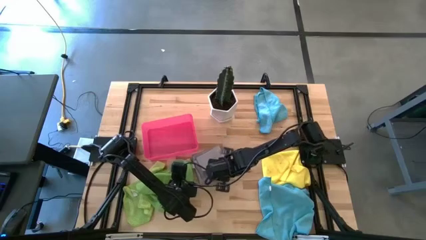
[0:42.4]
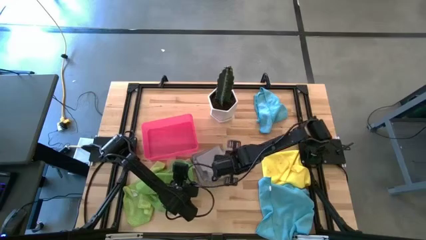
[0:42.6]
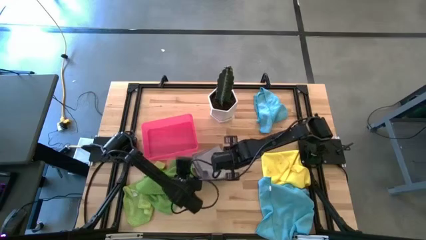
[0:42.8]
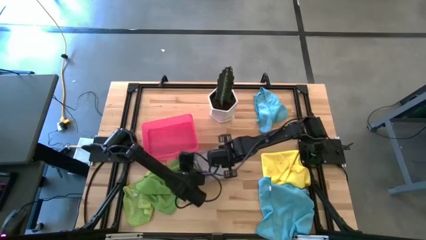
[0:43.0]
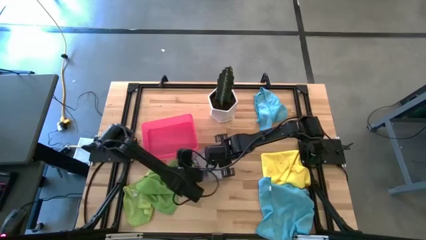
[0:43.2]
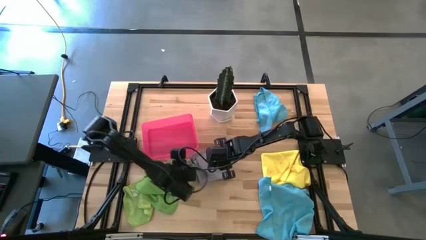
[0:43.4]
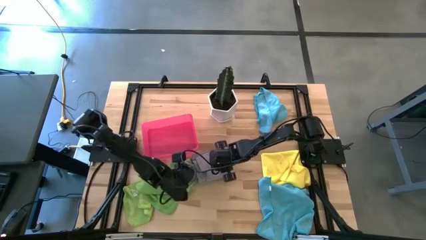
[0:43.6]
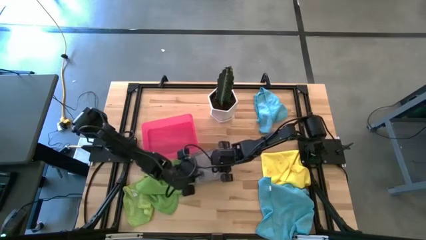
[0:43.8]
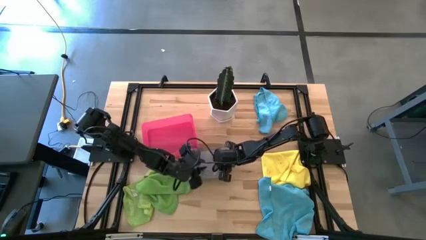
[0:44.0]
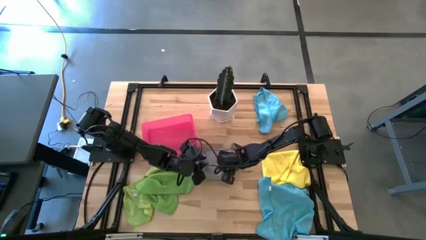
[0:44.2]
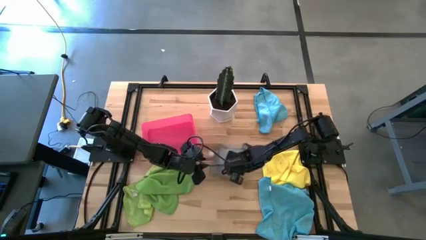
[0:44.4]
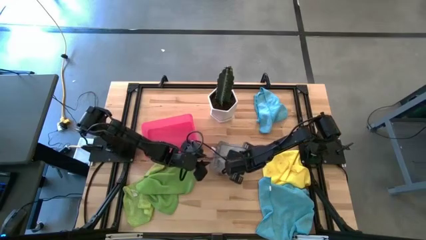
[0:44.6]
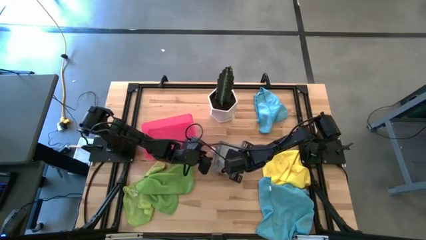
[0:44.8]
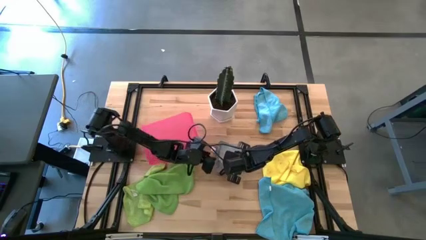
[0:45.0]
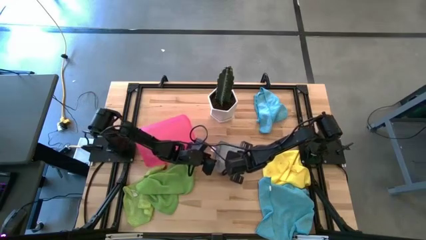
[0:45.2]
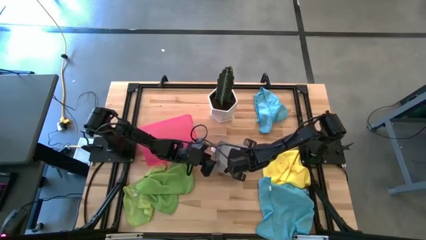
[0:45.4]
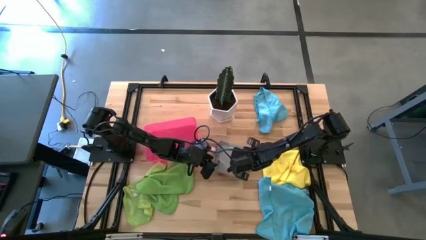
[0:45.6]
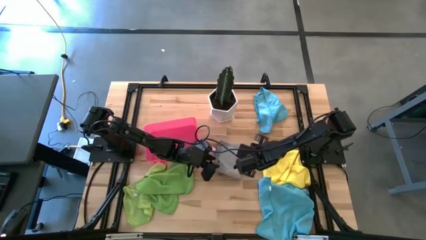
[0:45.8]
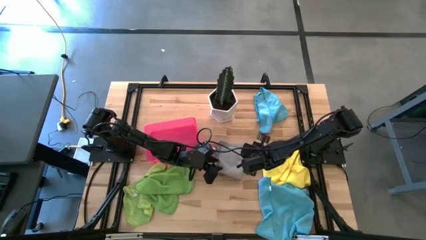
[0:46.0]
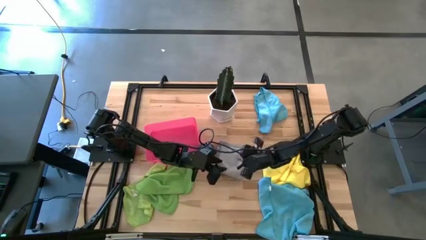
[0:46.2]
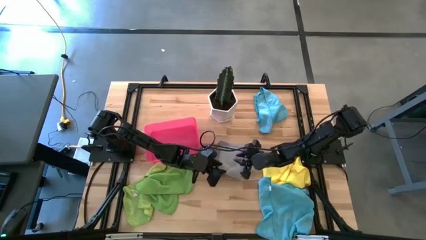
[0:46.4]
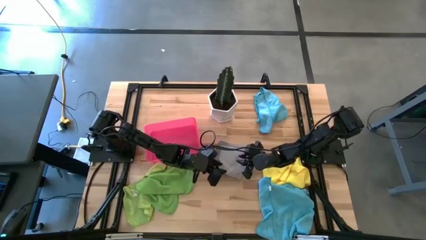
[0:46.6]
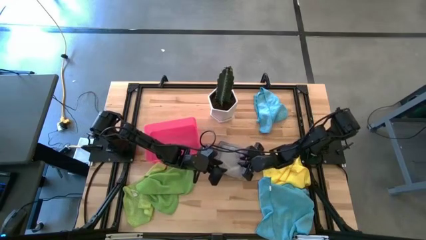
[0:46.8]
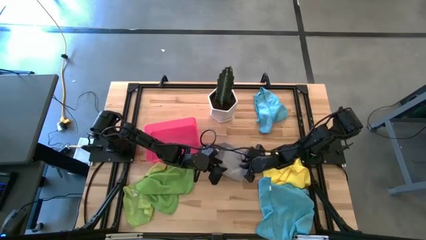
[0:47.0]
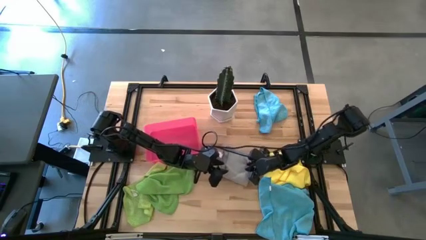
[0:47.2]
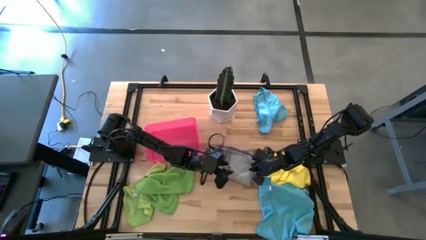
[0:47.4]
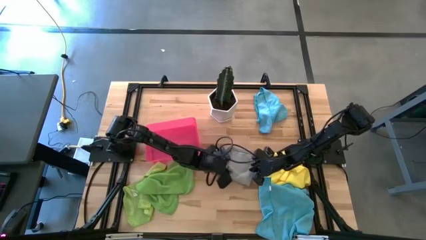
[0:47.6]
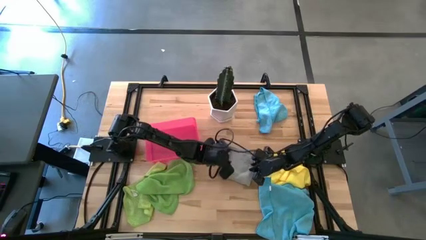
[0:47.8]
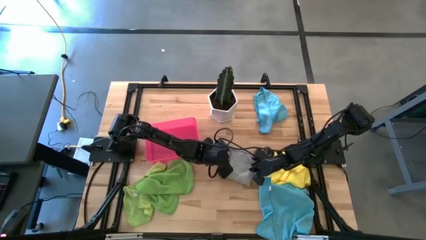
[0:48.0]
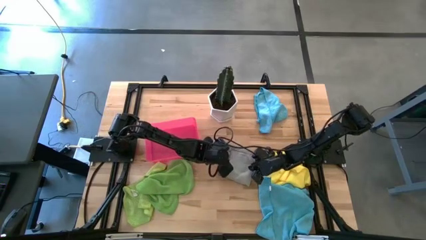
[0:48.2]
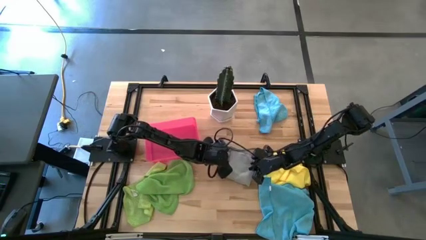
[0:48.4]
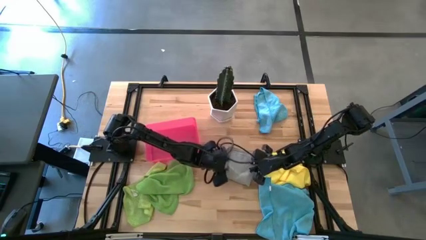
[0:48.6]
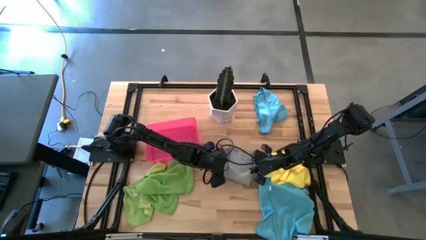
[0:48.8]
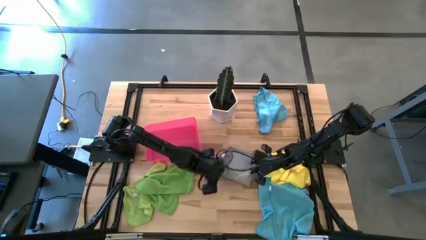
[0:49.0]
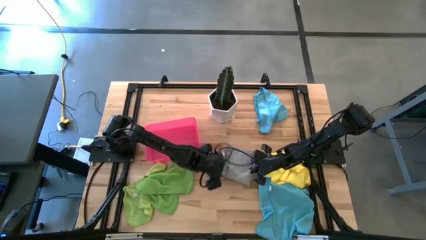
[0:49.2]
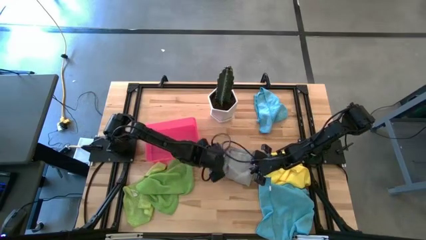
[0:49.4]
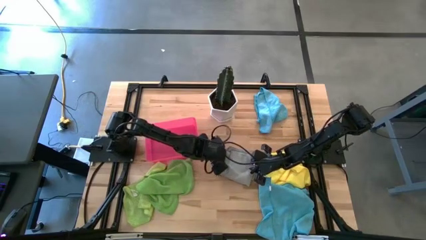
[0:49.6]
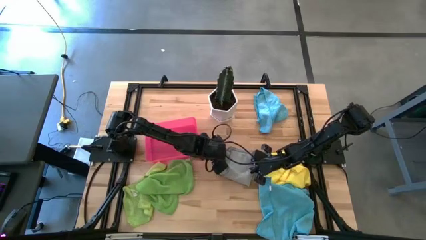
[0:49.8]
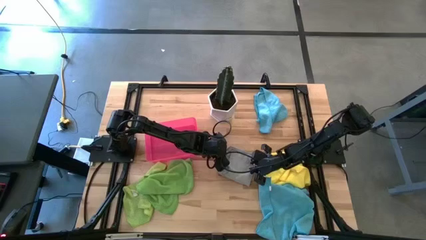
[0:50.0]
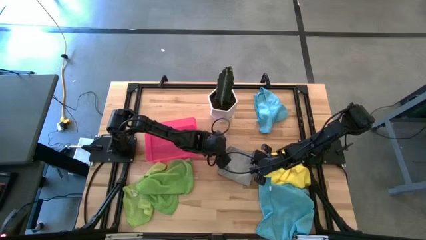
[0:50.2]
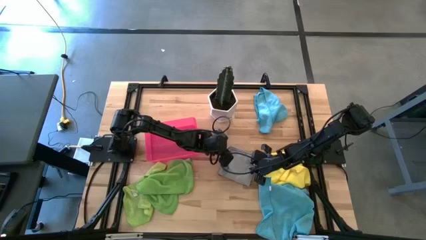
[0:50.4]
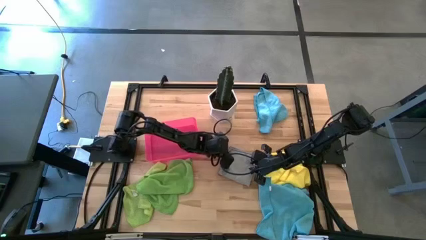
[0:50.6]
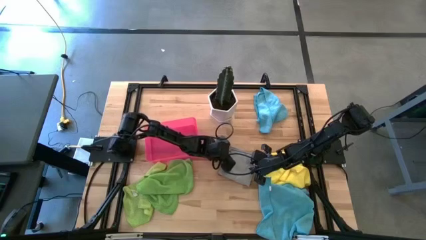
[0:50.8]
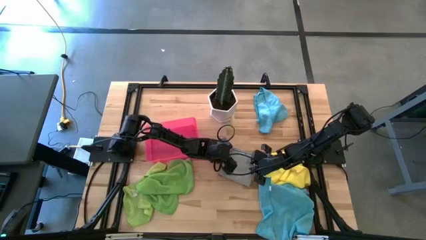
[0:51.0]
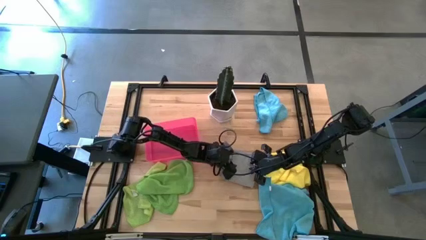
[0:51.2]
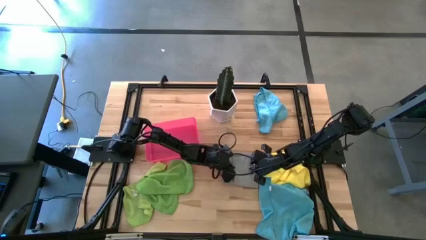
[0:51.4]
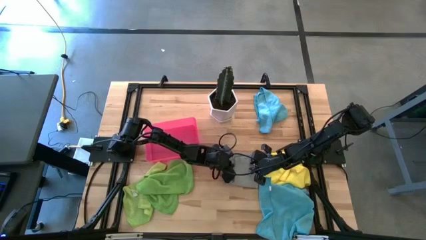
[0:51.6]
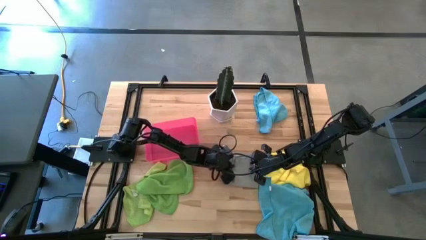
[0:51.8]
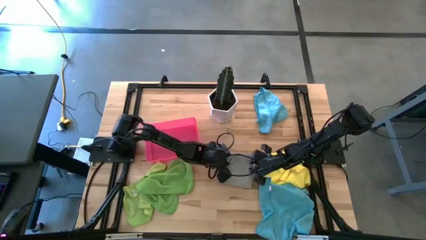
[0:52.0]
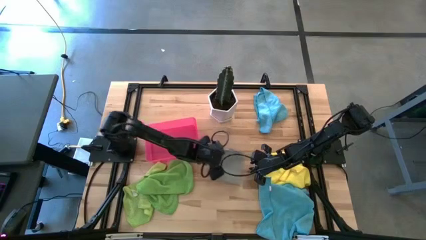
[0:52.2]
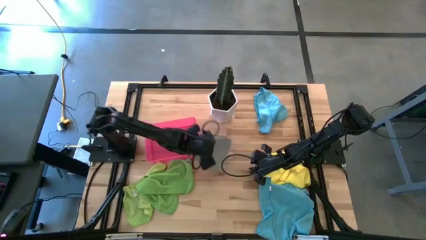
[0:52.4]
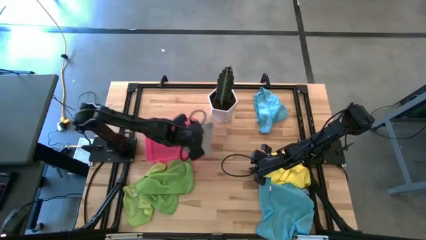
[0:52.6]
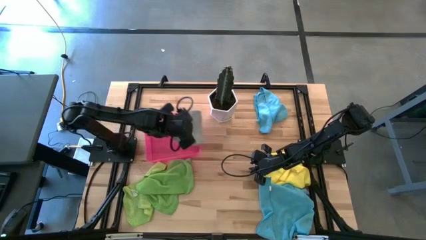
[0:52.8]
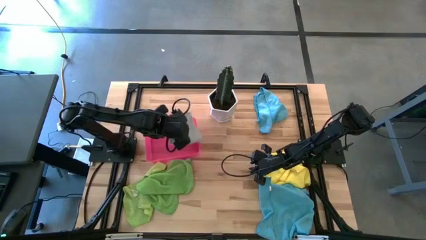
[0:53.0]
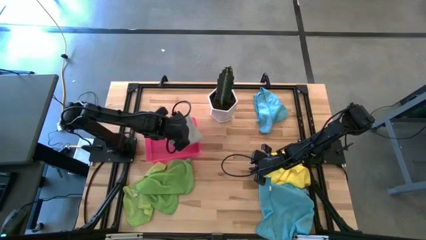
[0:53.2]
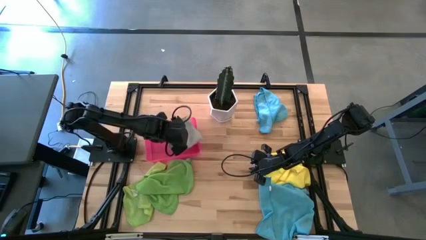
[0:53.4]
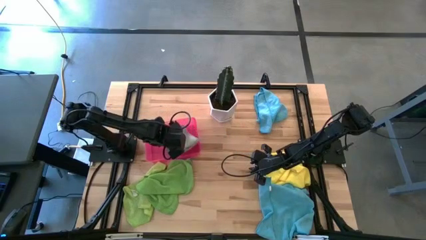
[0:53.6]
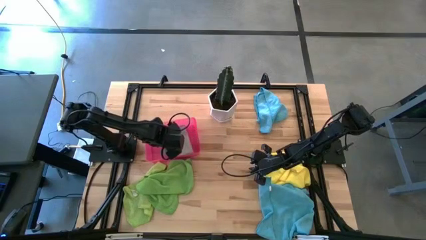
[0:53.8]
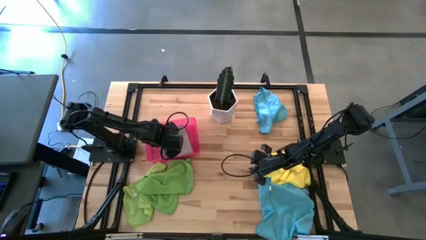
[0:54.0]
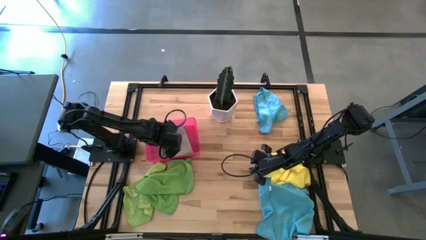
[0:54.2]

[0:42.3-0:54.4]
Task: Fold microfiber towels
Put the folded gray microfiber cloth into the transparent pink bin

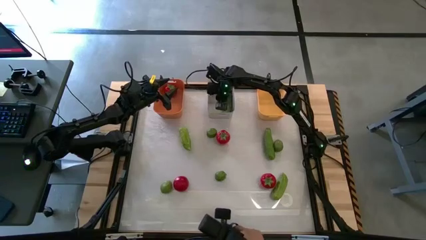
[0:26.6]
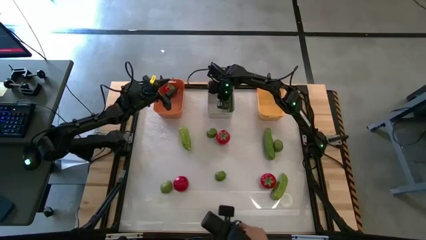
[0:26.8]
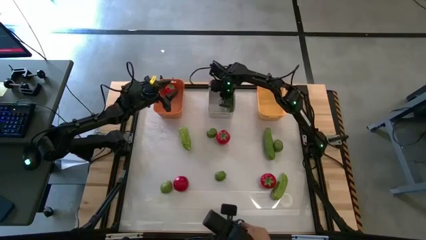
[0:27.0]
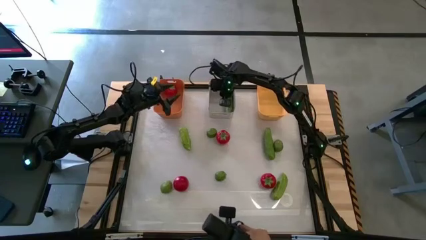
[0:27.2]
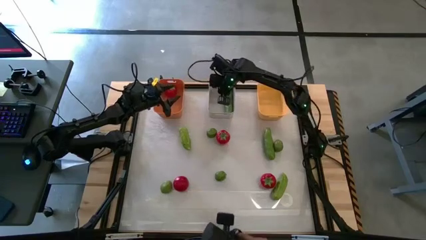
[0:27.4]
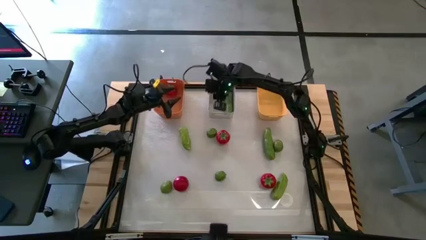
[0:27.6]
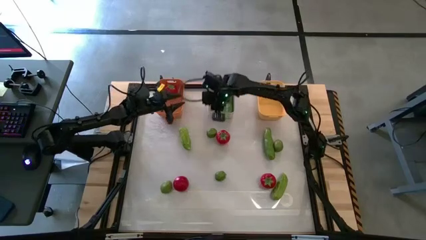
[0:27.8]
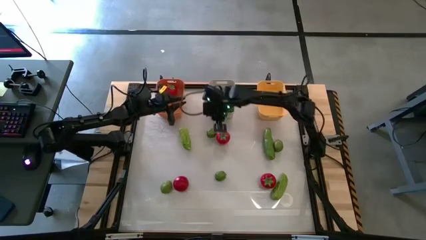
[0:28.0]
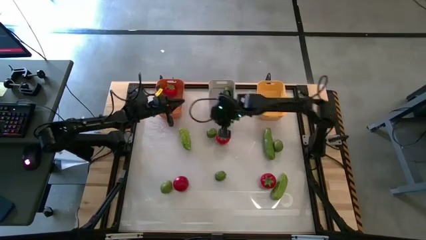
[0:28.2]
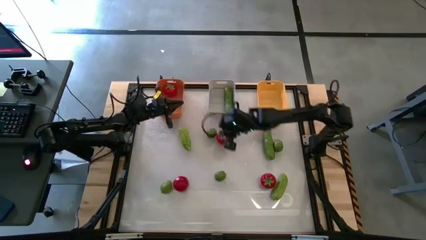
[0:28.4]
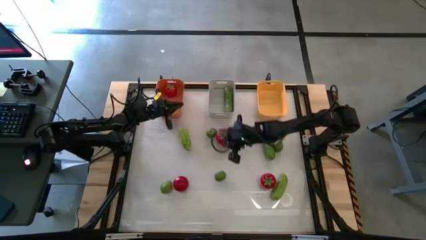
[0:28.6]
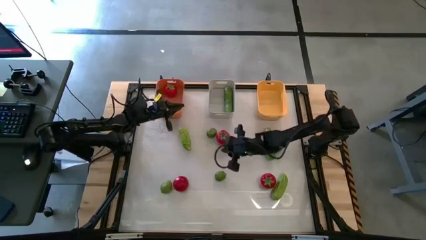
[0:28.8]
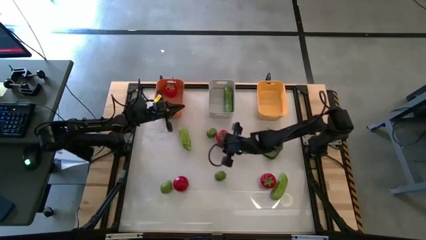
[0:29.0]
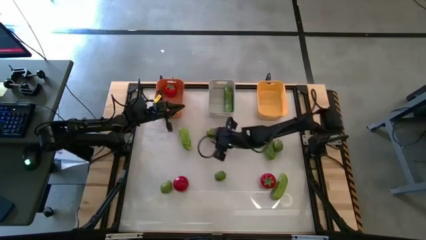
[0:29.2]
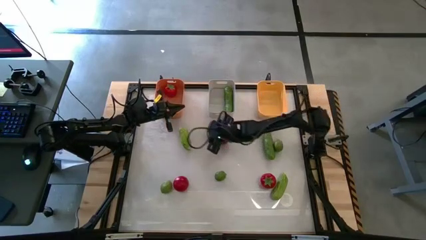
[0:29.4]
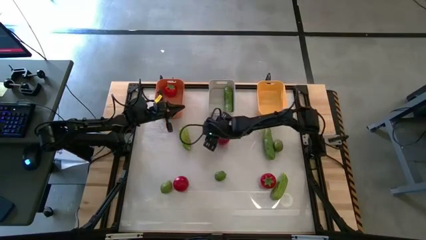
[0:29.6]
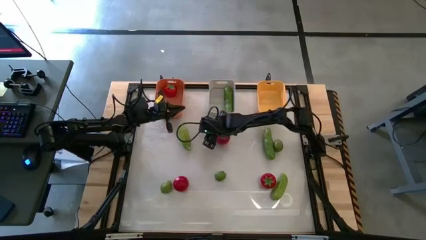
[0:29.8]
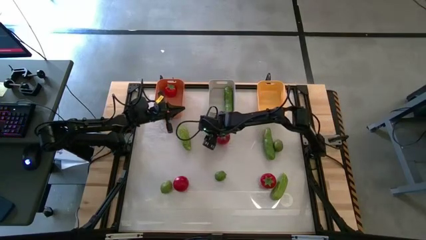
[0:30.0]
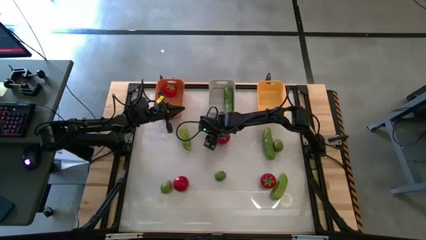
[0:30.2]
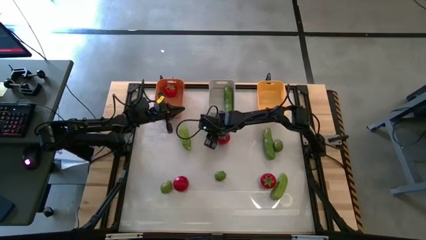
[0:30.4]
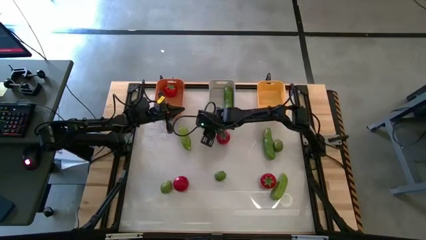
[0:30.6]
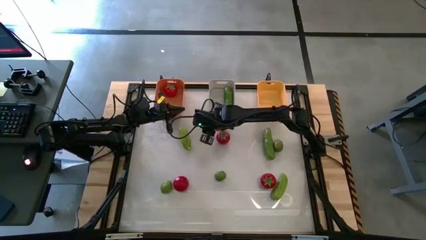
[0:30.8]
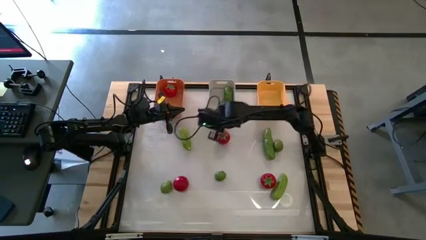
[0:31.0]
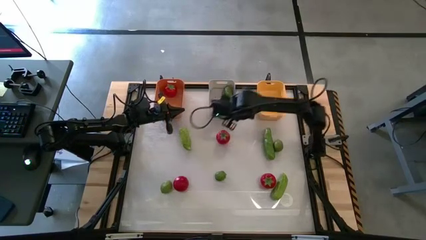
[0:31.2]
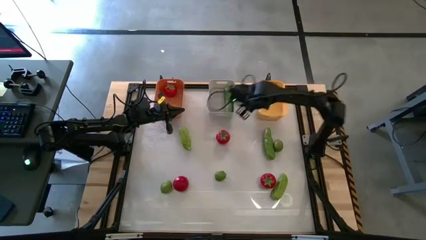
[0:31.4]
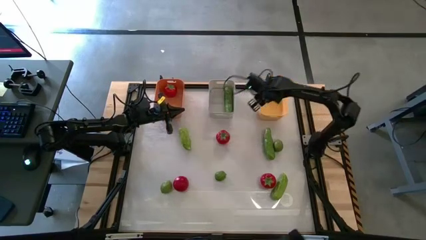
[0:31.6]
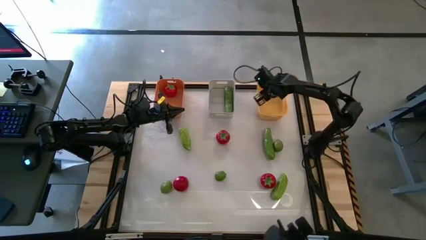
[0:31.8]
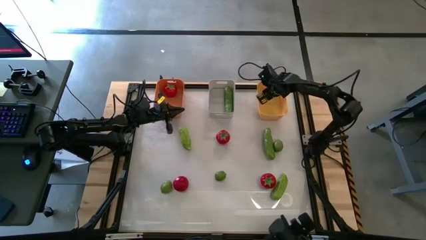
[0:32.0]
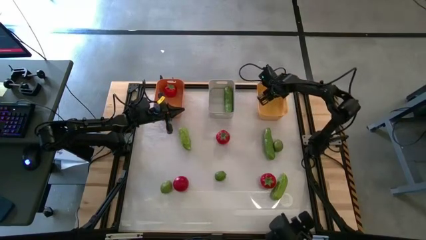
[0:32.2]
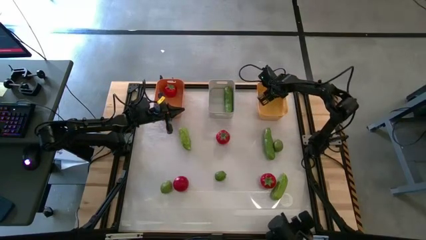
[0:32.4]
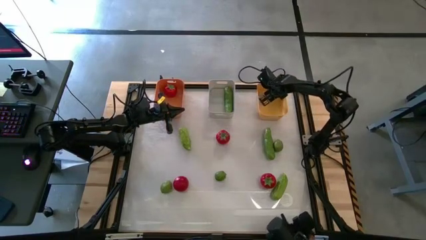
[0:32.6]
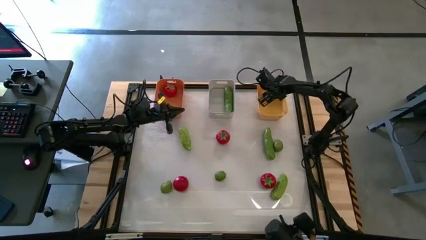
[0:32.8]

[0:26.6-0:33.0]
Task: Sort produce into baskets
Put the top left lime into the yellow bin
